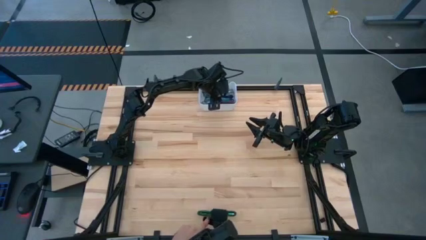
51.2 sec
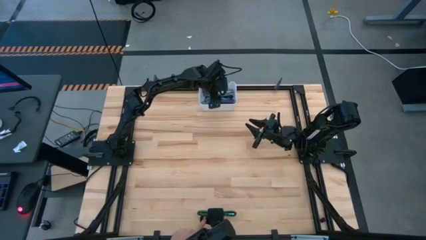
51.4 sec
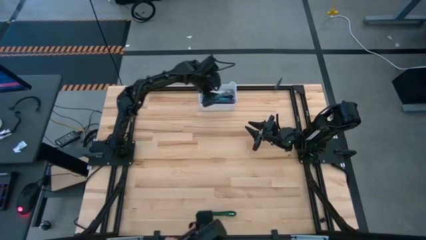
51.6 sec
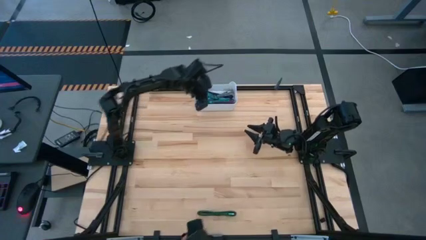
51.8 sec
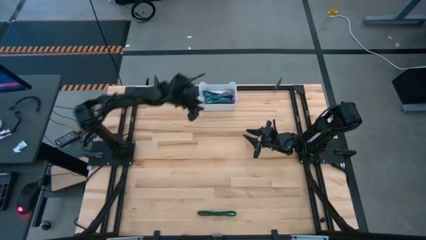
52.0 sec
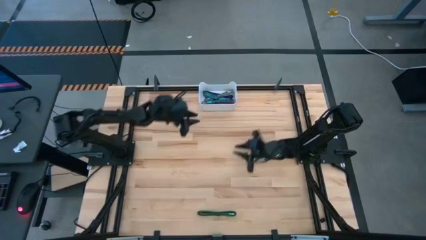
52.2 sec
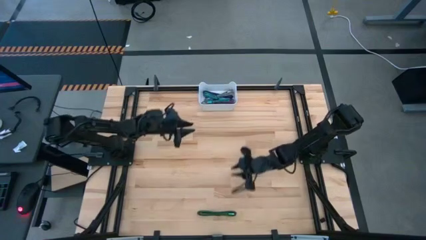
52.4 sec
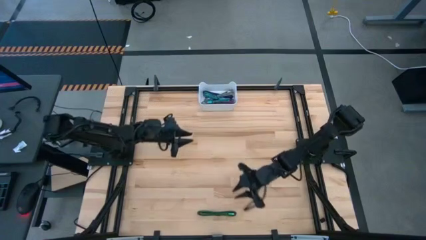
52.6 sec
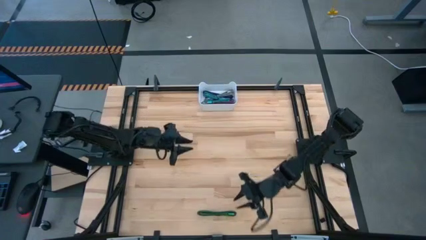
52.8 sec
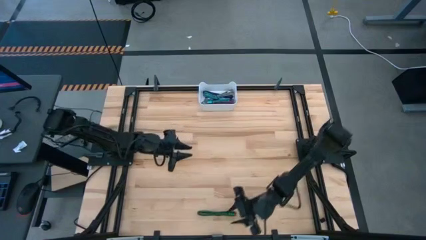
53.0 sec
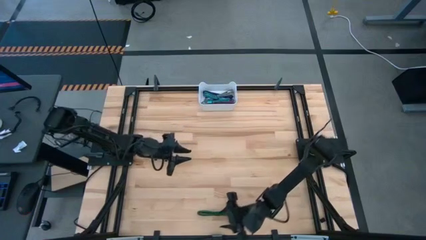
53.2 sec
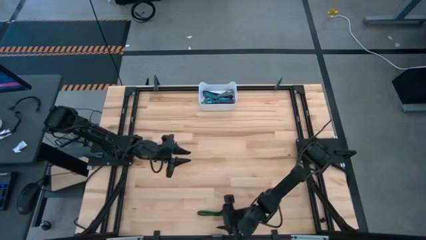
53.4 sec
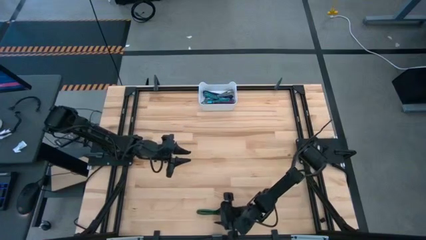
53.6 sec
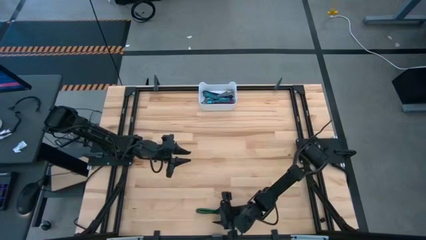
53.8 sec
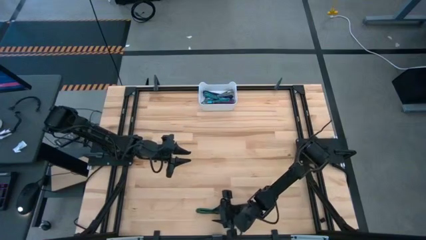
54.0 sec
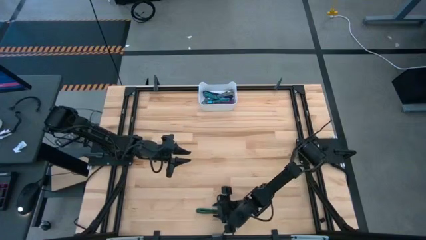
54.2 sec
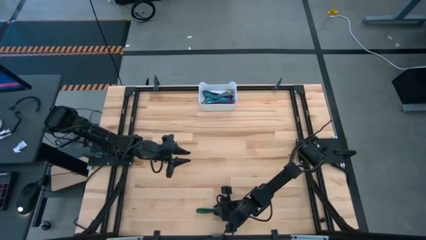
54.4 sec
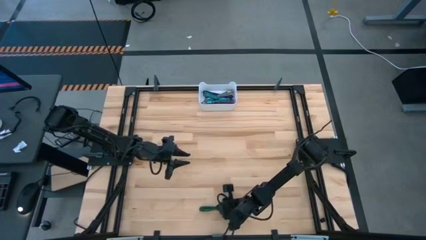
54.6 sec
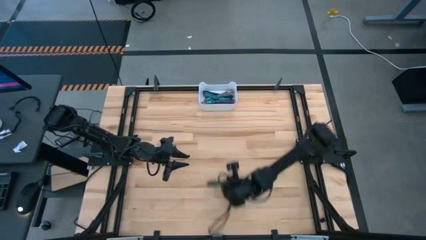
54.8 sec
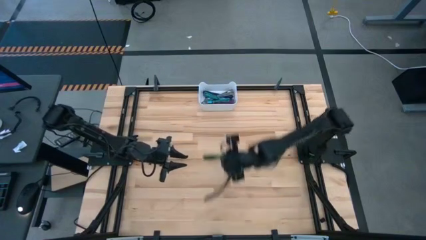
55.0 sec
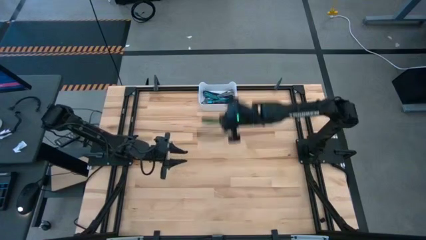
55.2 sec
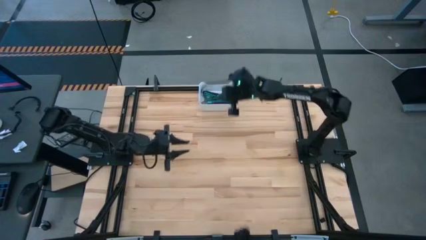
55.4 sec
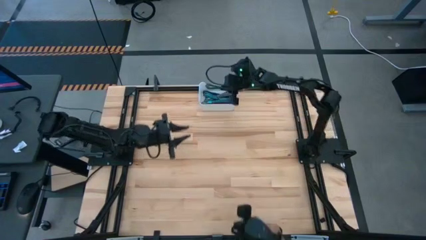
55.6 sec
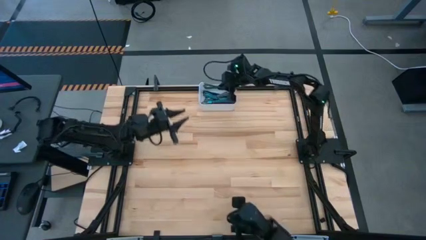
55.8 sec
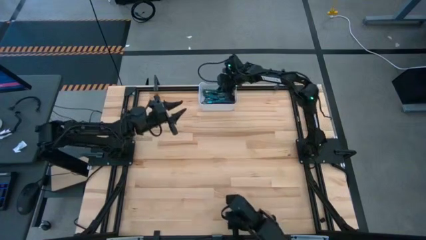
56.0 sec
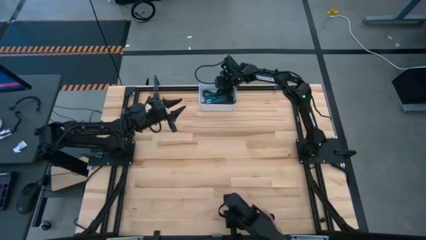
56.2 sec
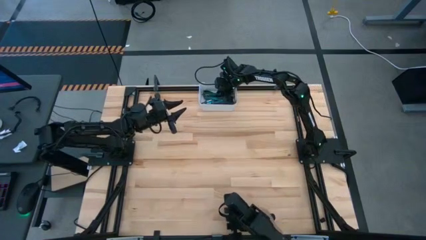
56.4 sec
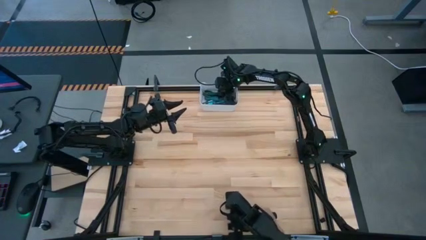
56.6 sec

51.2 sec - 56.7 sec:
Task: Pick and place USB-C Cables
Put the green charger cable into the white bin

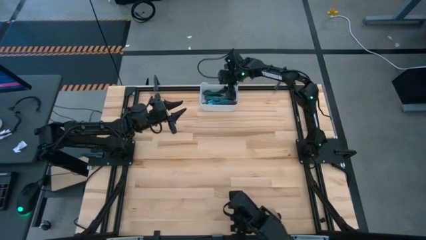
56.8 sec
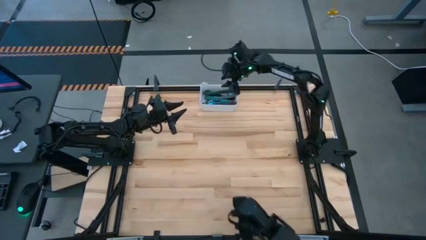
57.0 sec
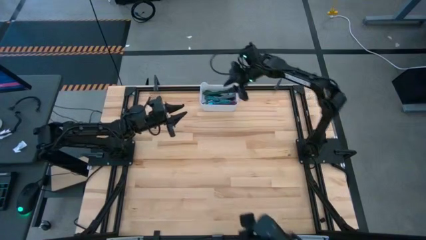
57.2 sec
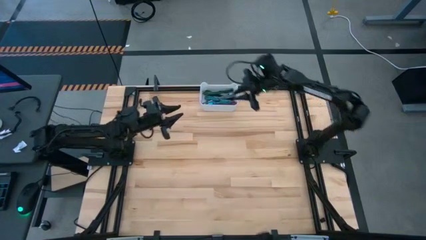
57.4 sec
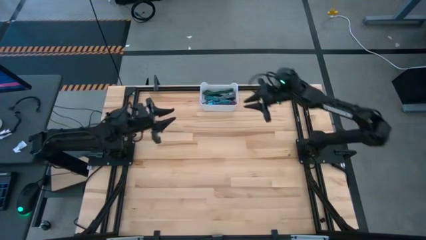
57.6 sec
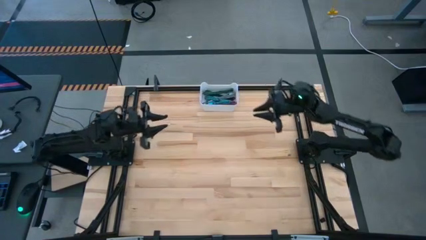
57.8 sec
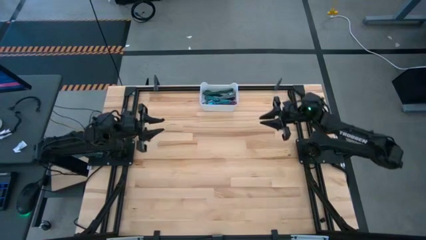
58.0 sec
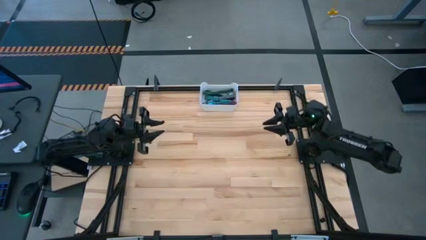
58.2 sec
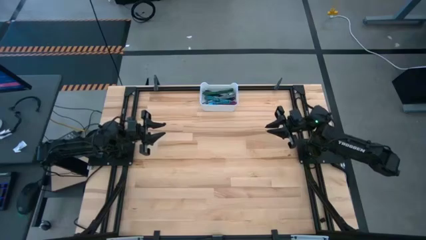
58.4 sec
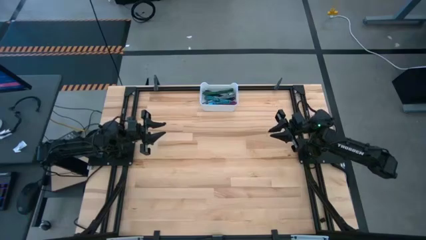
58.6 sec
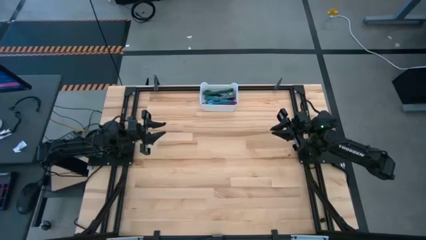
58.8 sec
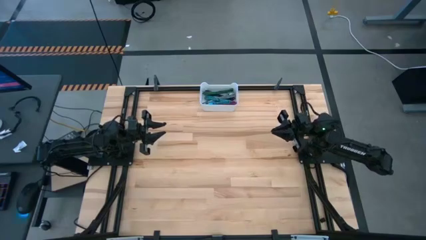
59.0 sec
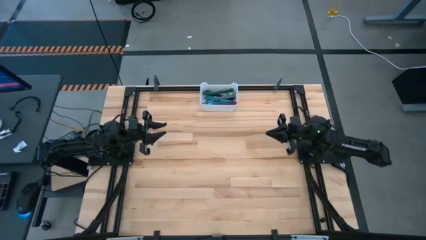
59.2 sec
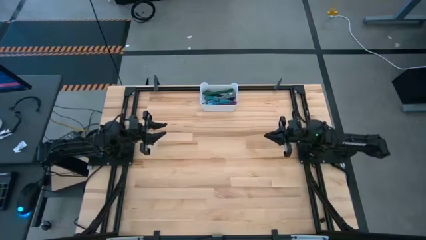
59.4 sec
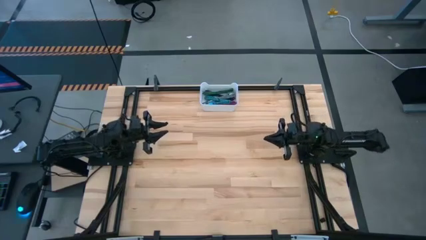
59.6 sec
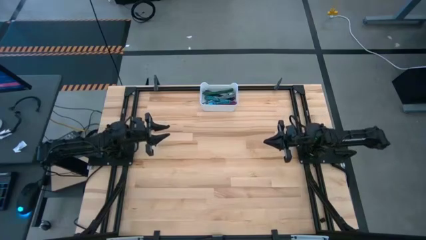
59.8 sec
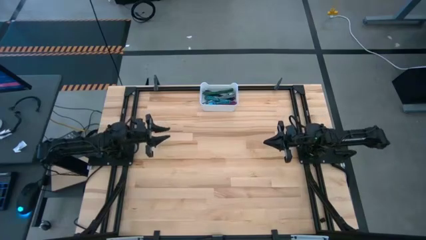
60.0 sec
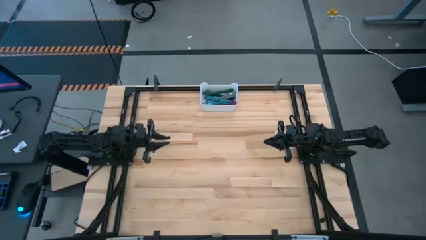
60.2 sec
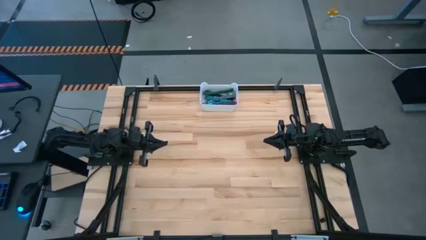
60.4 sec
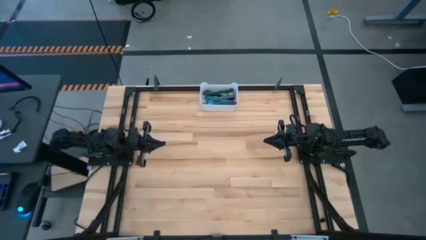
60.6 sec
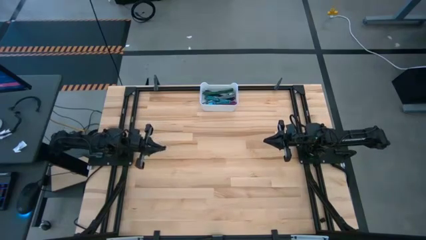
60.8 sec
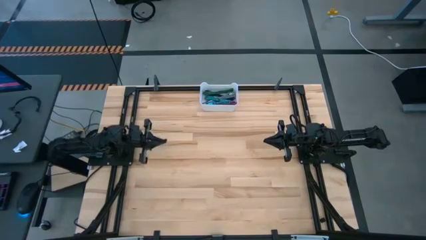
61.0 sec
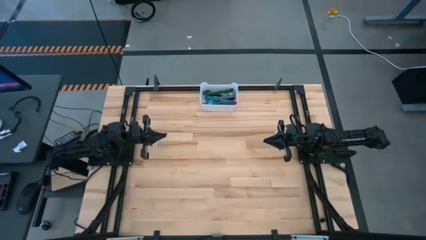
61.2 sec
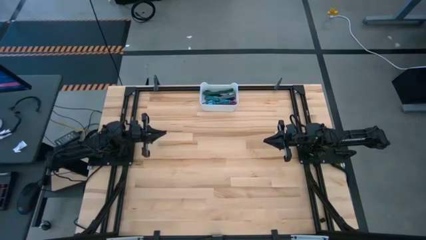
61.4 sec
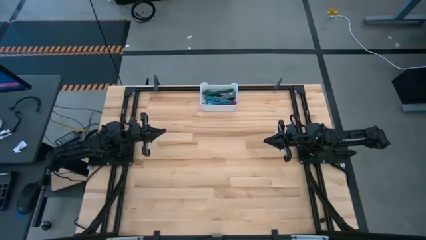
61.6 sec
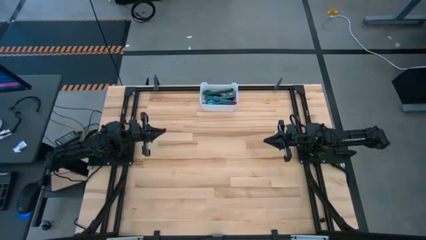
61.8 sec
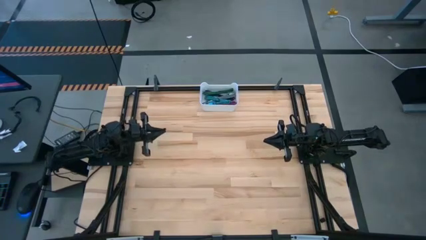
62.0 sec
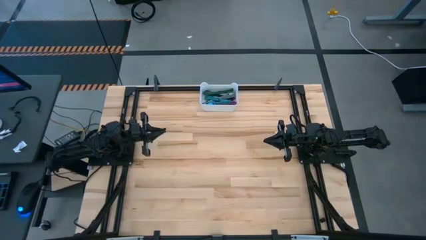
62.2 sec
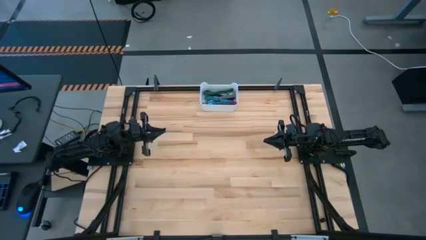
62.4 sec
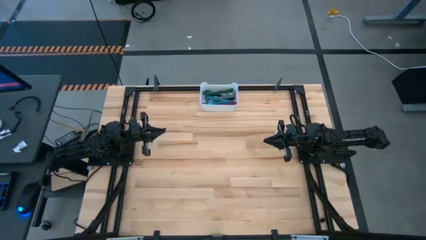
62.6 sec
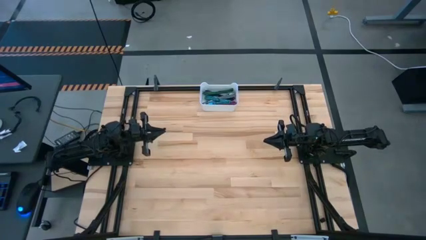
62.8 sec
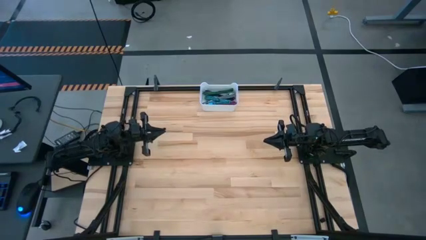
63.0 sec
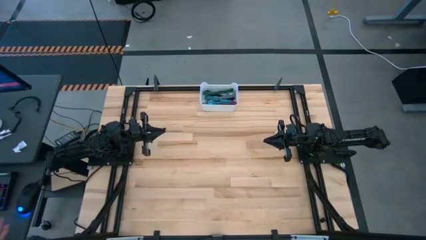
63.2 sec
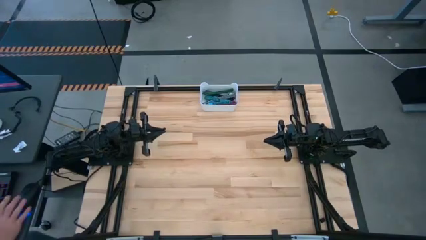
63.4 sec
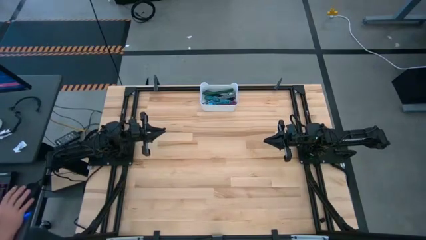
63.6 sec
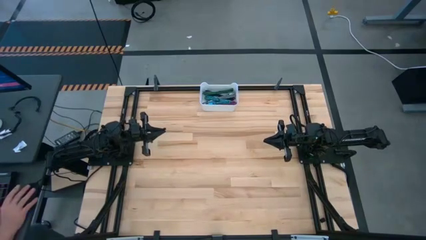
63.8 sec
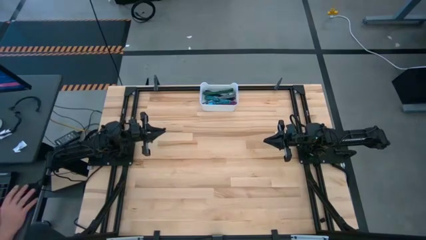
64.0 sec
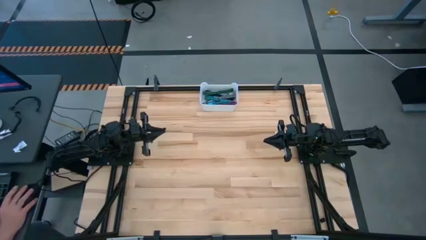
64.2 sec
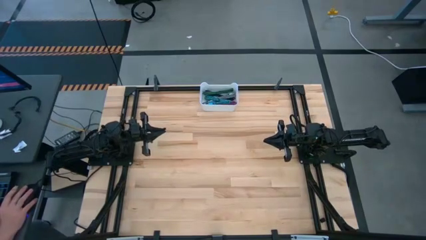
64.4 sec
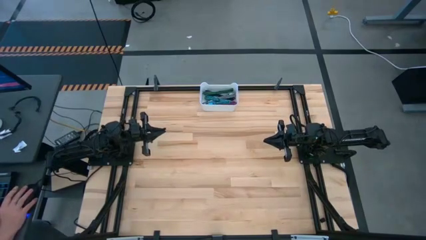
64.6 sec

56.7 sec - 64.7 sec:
Return to home position

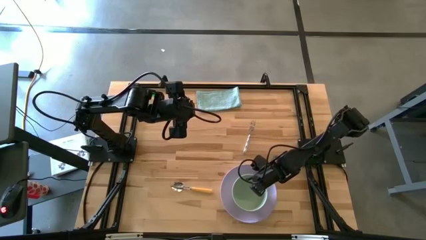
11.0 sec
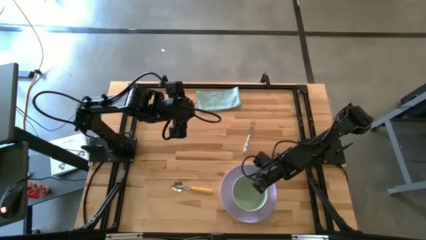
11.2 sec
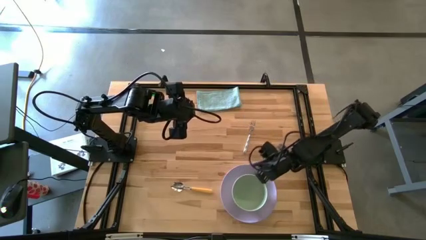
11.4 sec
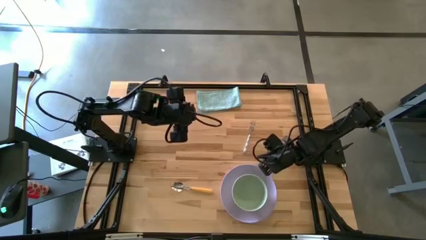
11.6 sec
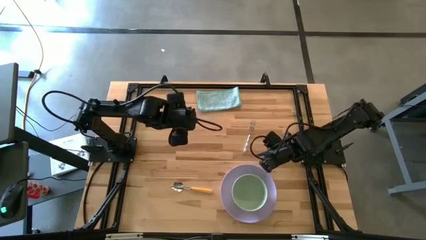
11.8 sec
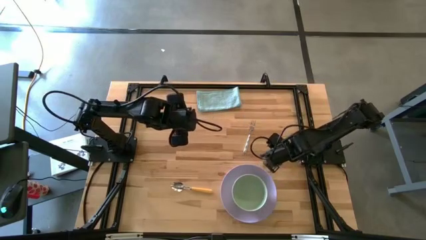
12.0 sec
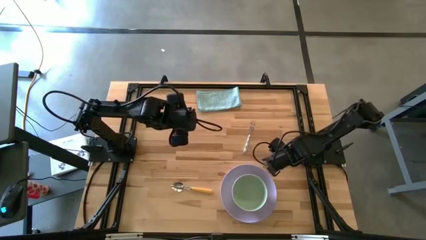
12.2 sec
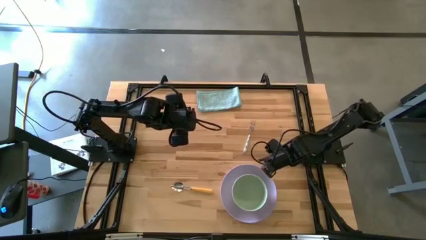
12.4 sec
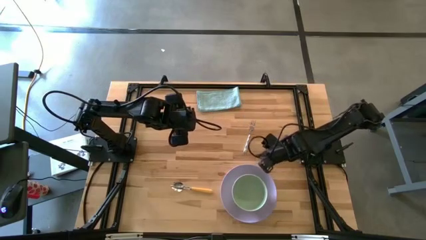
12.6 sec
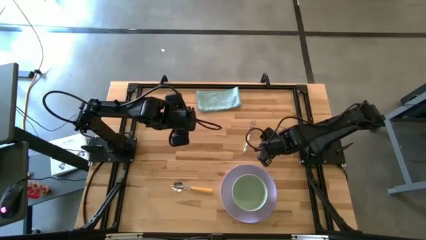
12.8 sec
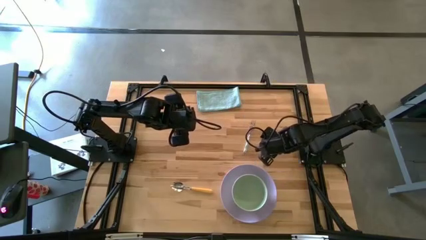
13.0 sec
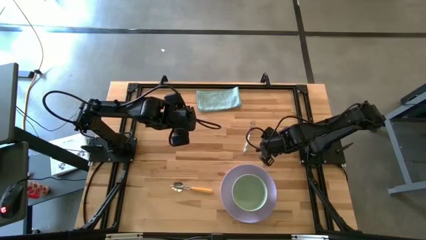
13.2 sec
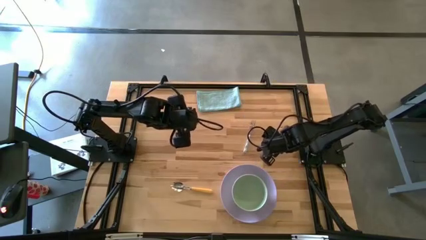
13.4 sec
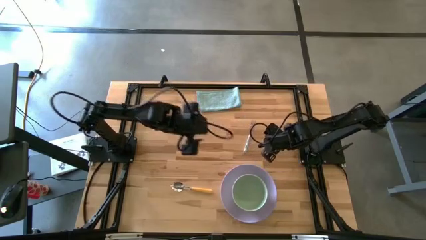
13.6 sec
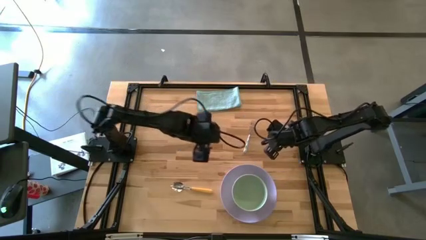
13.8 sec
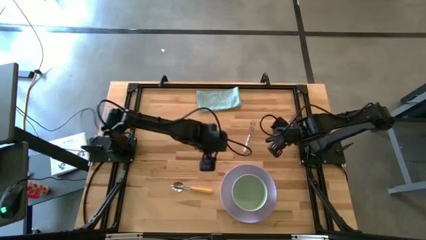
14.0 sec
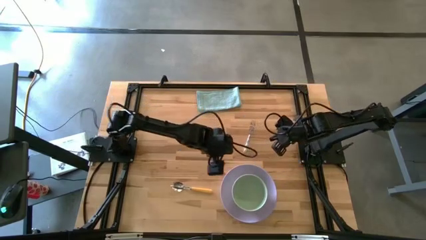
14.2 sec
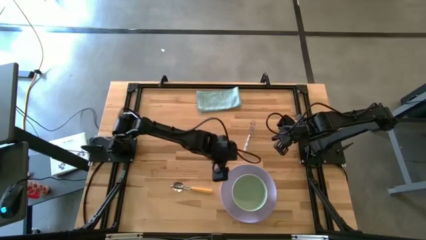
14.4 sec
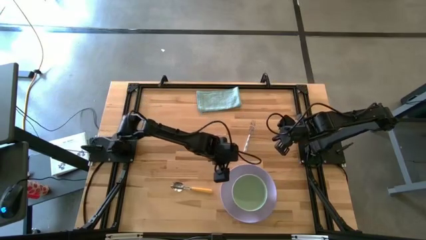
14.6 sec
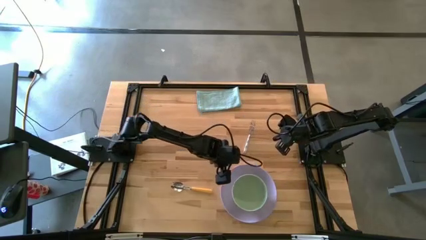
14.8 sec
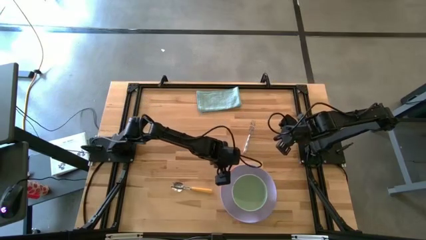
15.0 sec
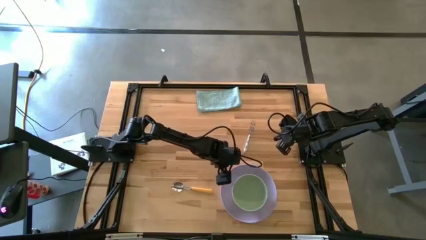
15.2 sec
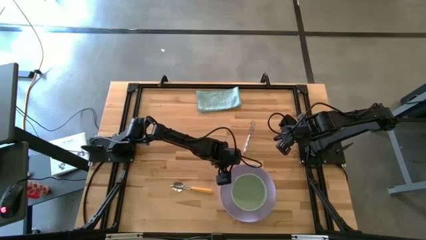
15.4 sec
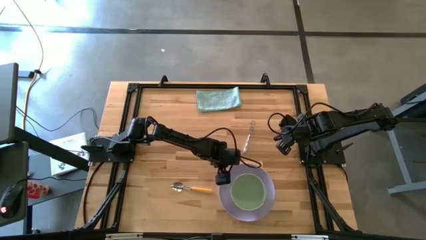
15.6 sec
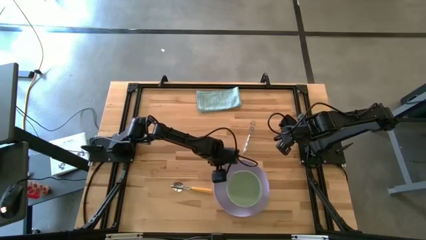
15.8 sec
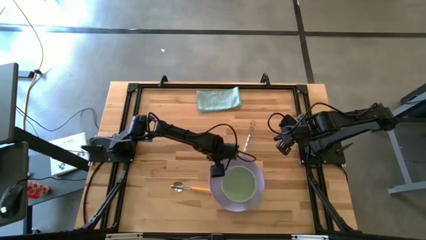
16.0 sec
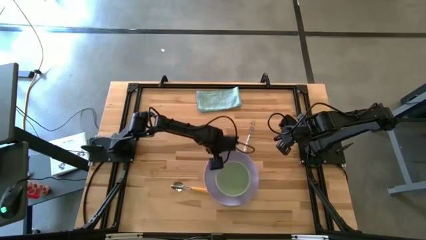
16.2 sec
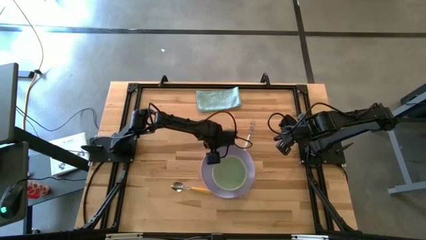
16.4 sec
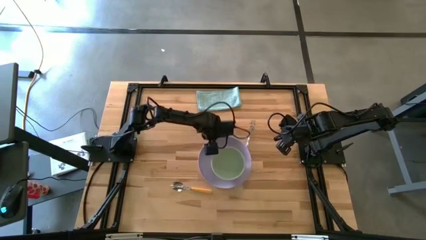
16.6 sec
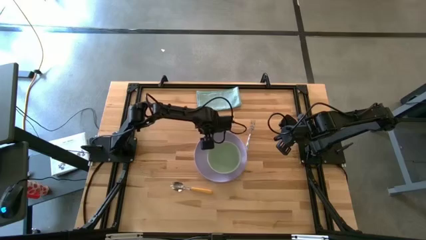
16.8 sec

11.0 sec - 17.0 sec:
Task: Set table place
Move the purple plate to the center of the table
